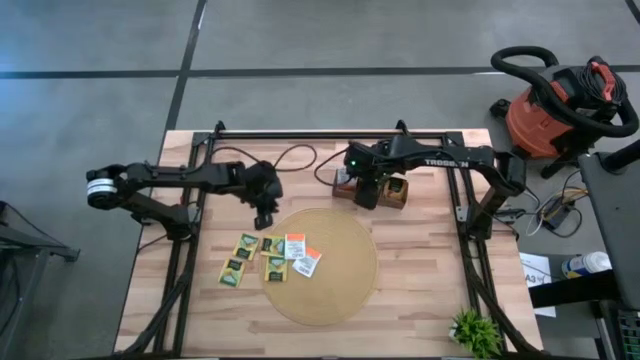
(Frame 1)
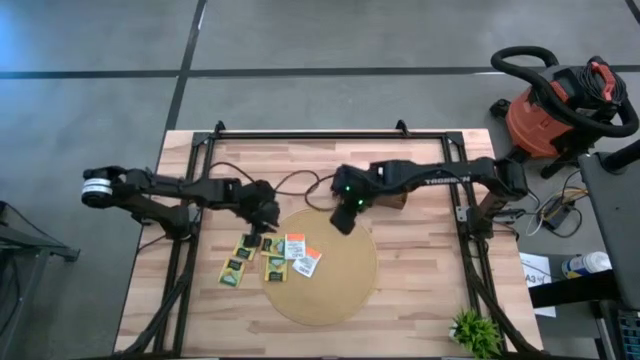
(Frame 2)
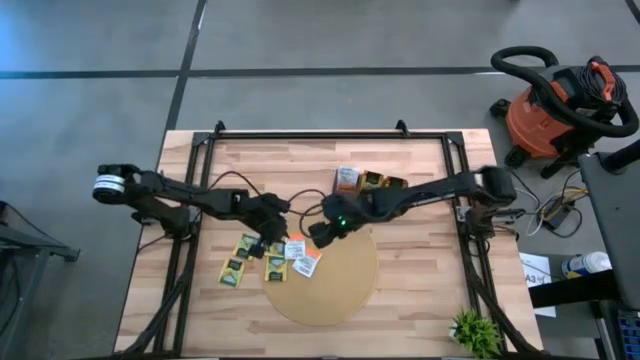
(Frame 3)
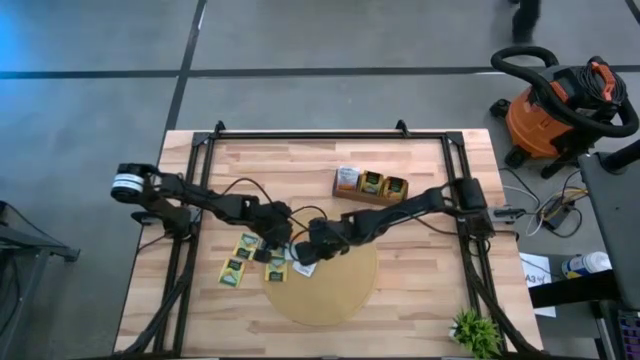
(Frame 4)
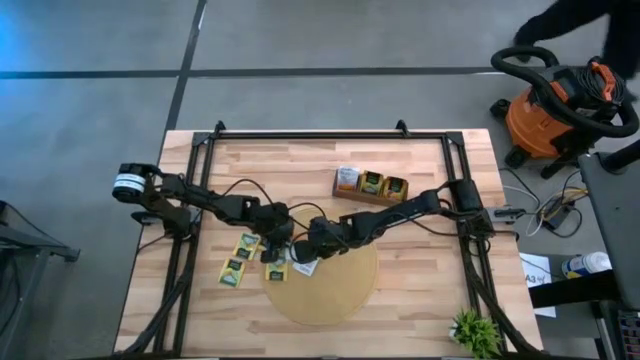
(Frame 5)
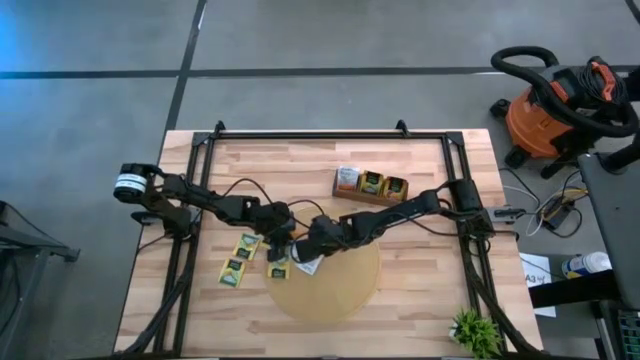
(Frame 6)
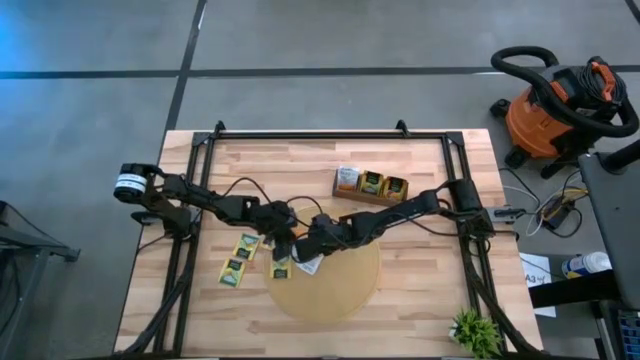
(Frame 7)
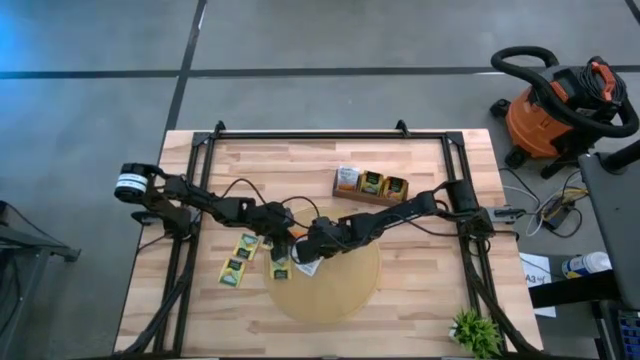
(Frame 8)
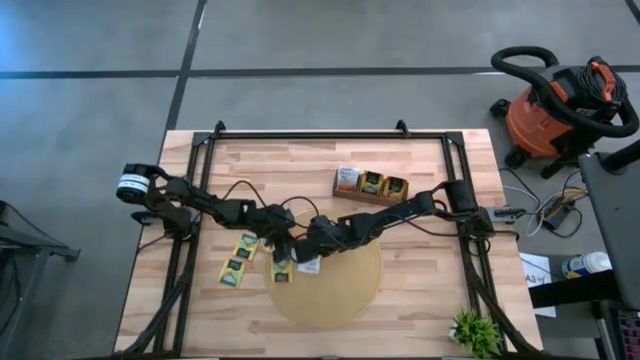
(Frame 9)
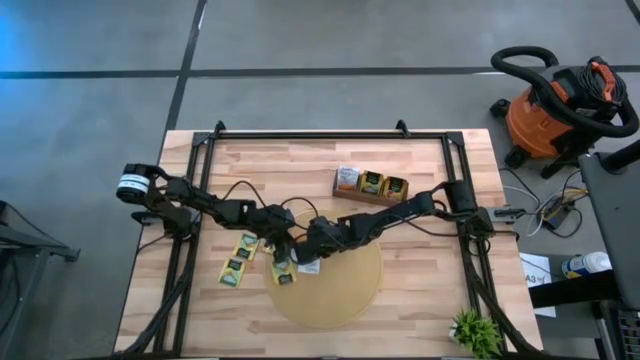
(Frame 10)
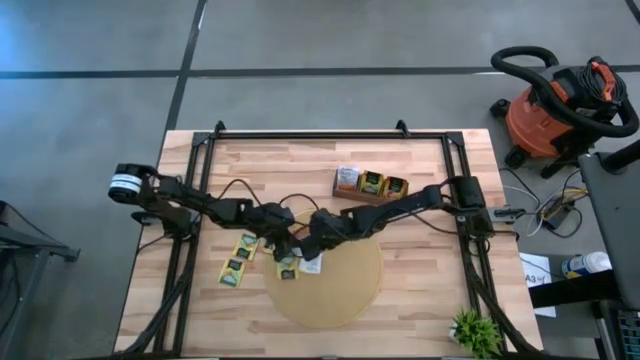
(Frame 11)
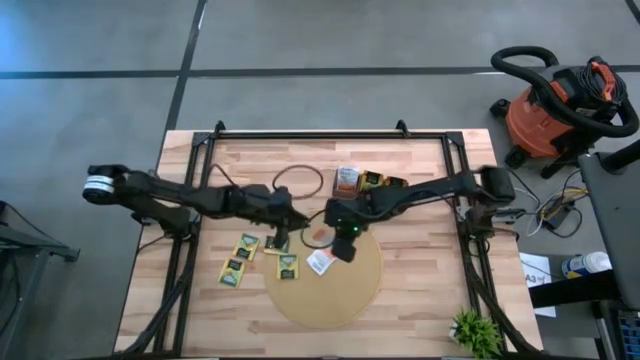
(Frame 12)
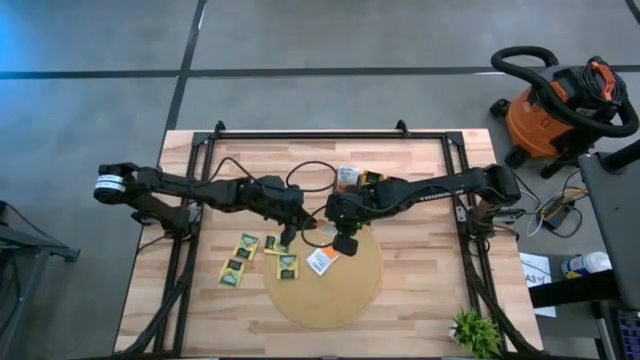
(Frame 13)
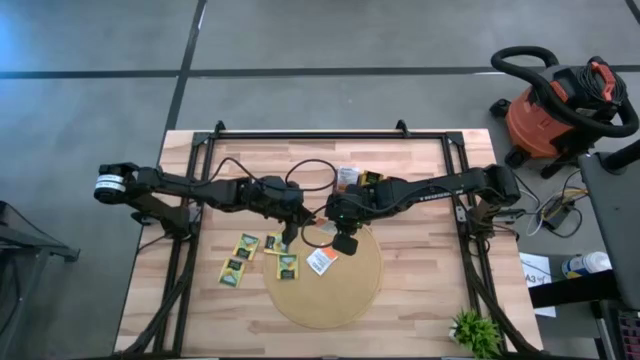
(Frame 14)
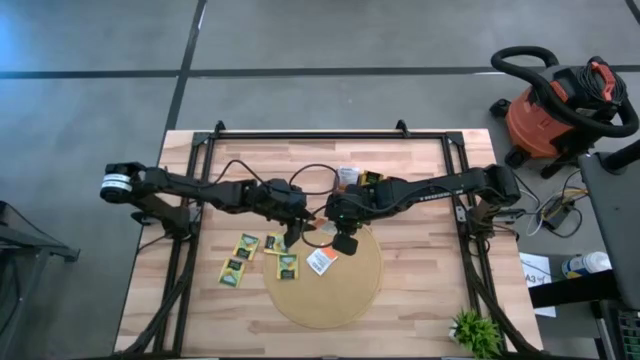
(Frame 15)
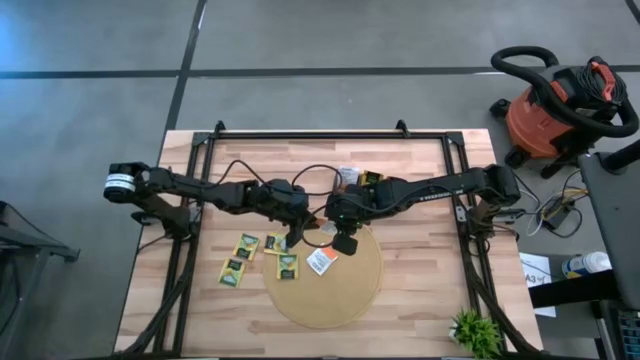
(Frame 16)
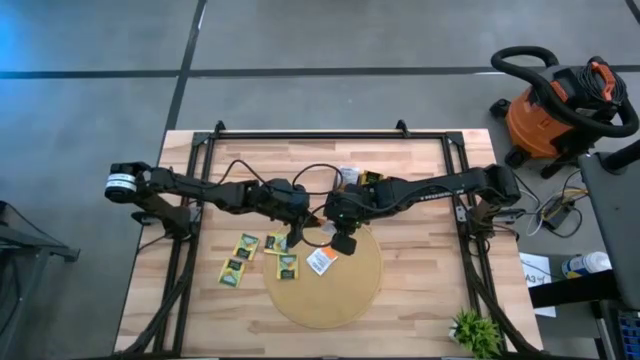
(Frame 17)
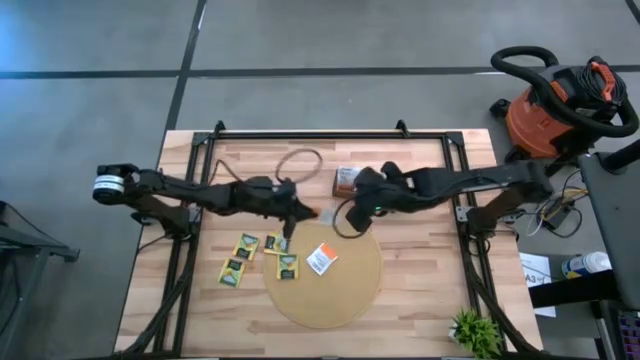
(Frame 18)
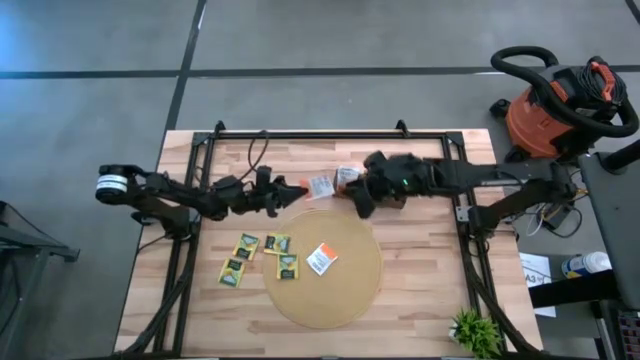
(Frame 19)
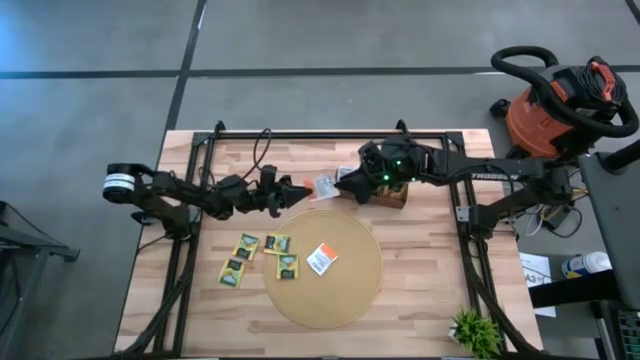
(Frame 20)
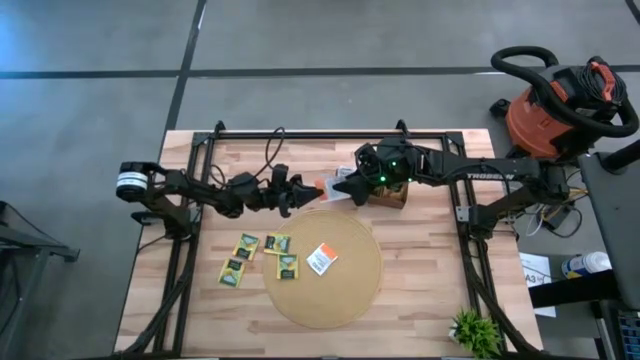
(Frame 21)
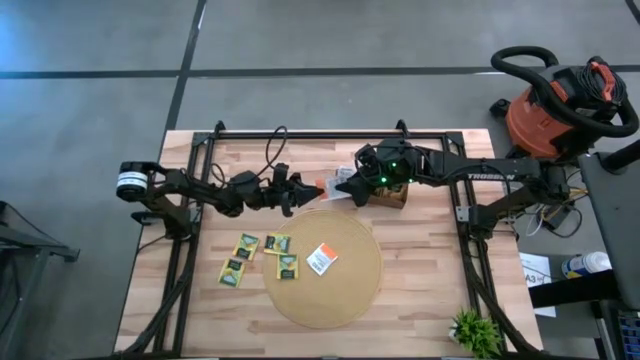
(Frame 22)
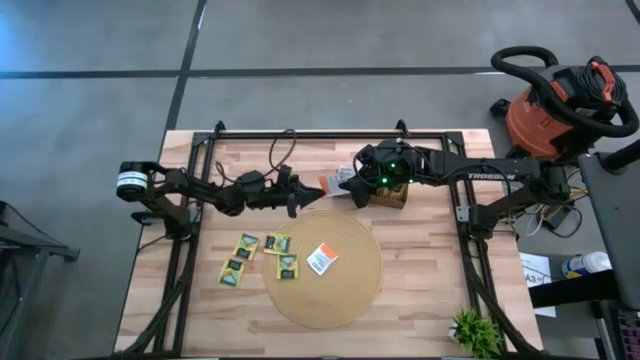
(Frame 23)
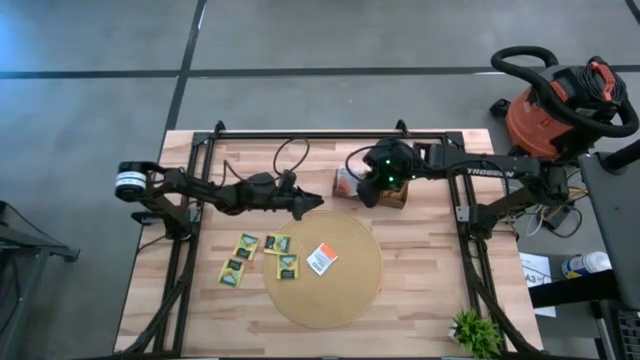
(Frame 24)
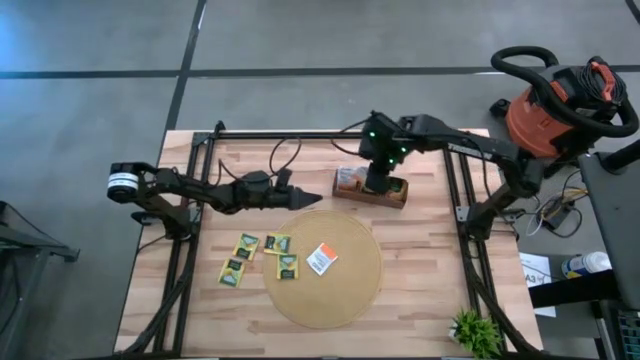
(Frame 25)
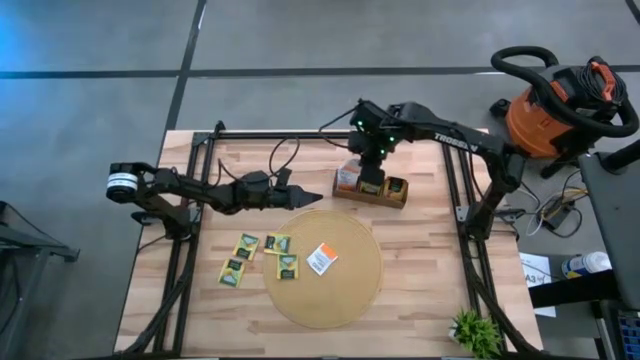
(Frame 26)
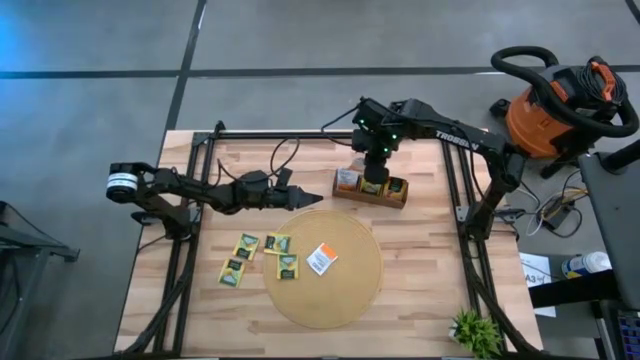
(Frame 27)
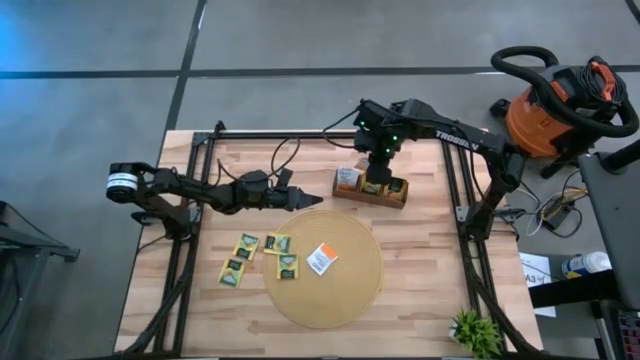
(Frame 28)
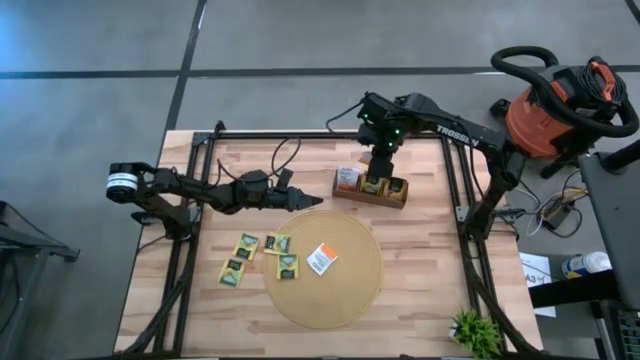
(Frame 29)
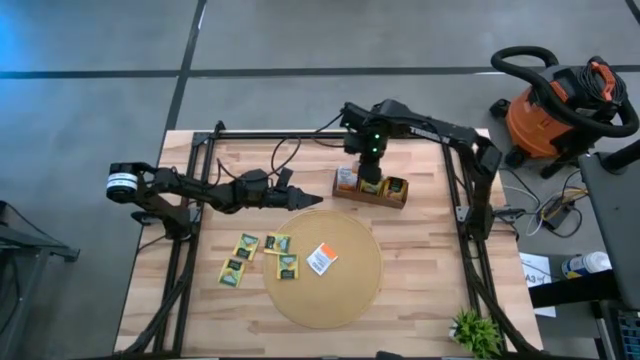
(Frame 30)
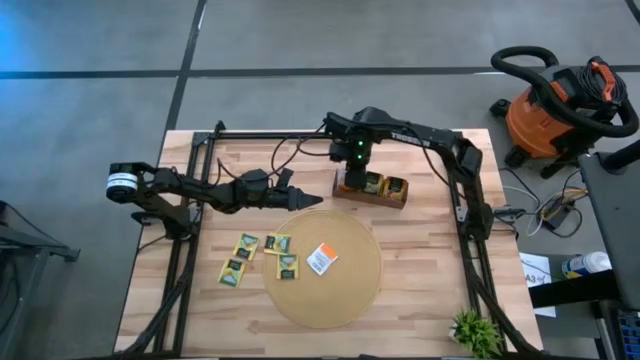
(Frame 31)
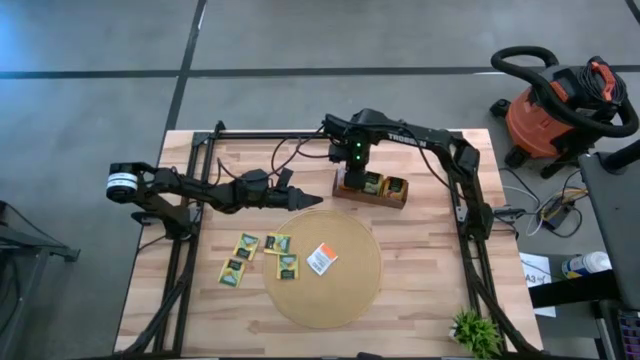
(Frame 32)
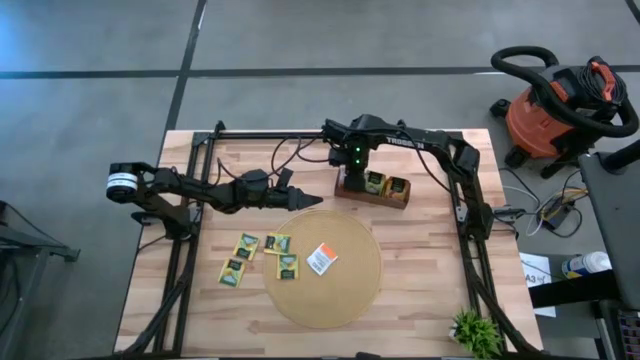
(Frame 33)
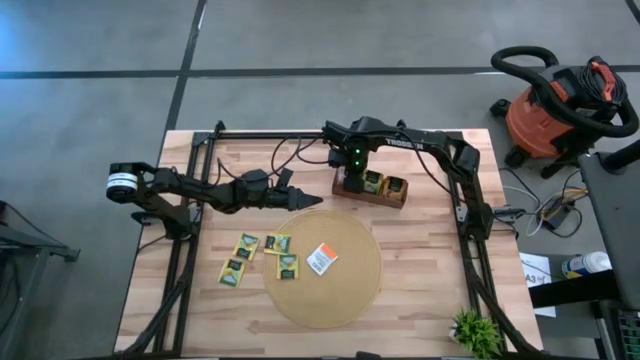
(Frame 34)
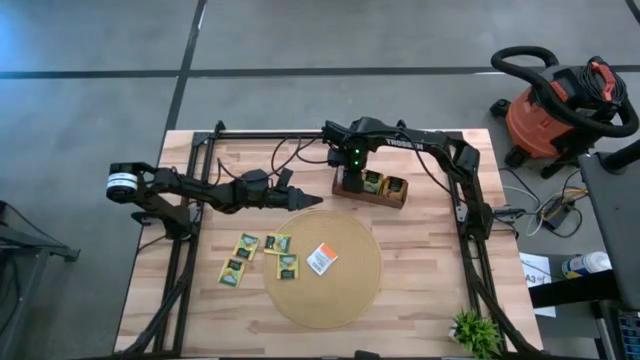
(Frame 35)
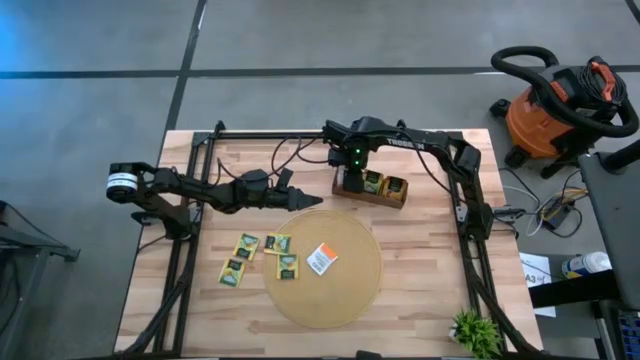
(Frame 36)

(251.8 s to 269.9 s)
Task: Pick & Place Tea
Put the orange tea bag into the left section of the wooden organizer
